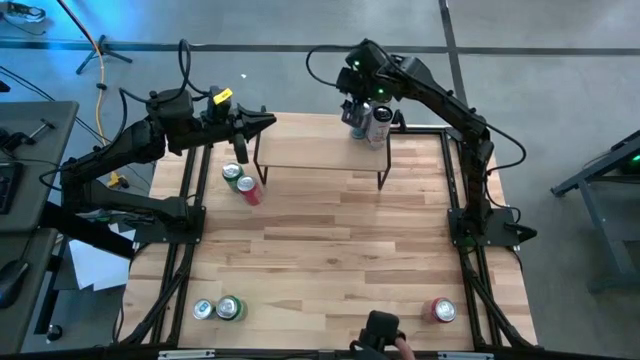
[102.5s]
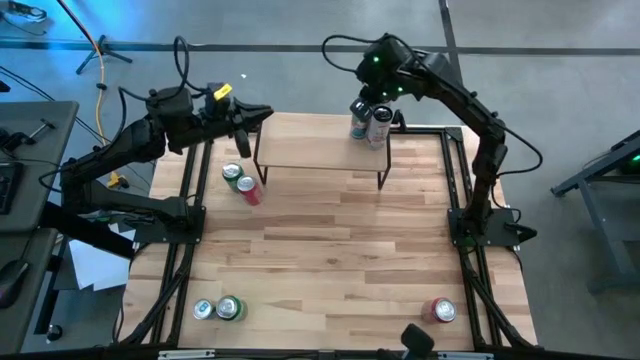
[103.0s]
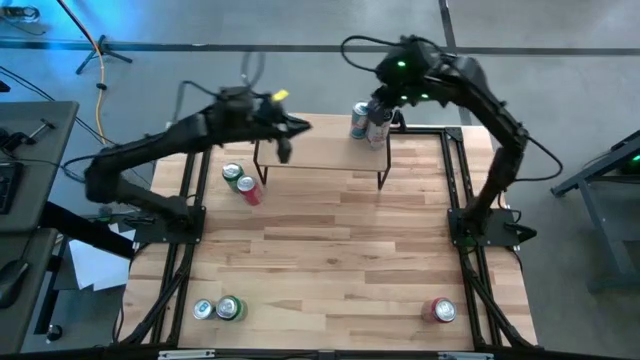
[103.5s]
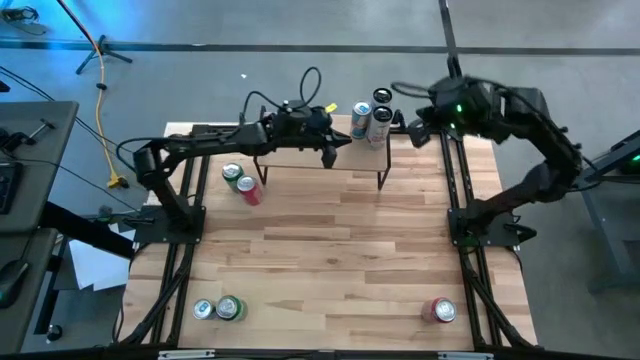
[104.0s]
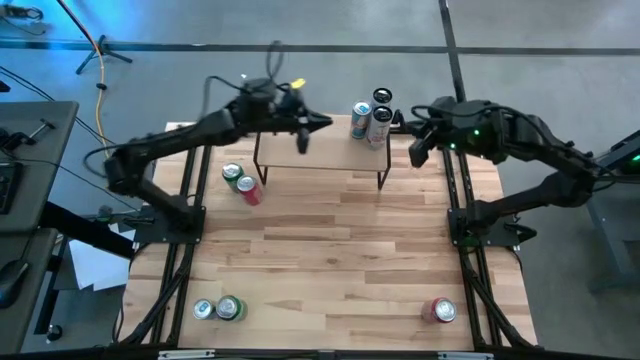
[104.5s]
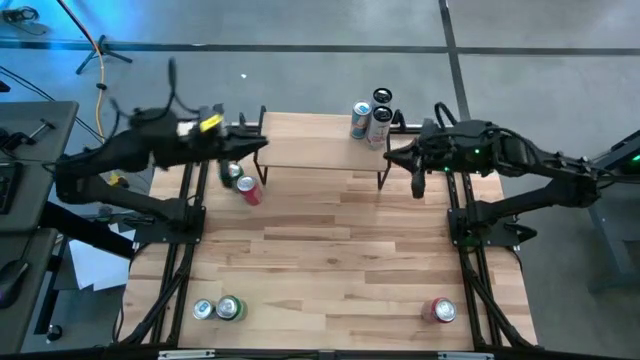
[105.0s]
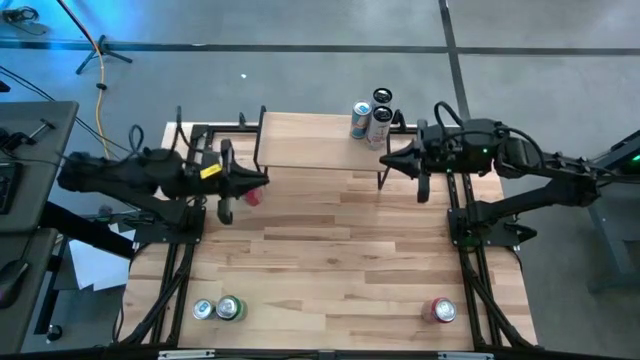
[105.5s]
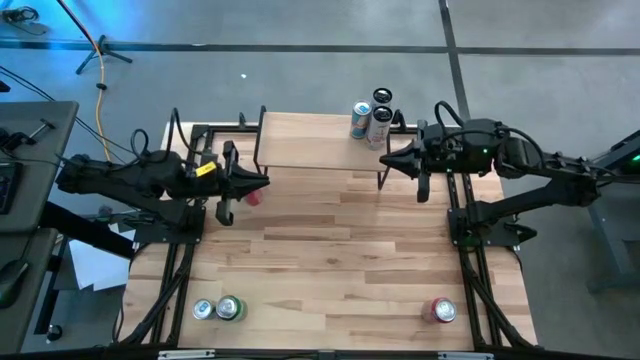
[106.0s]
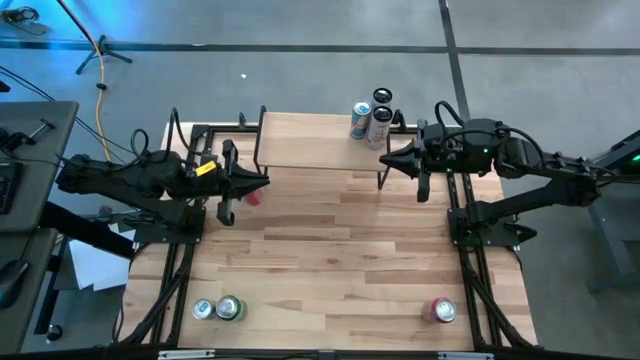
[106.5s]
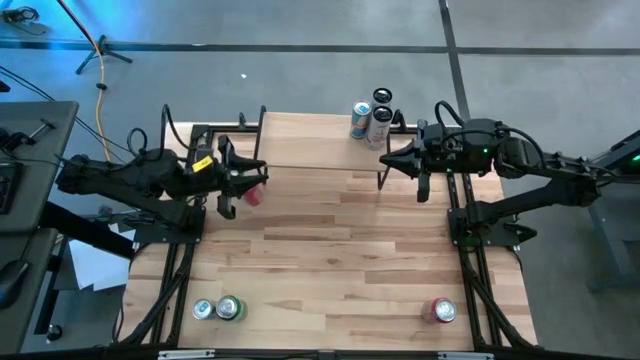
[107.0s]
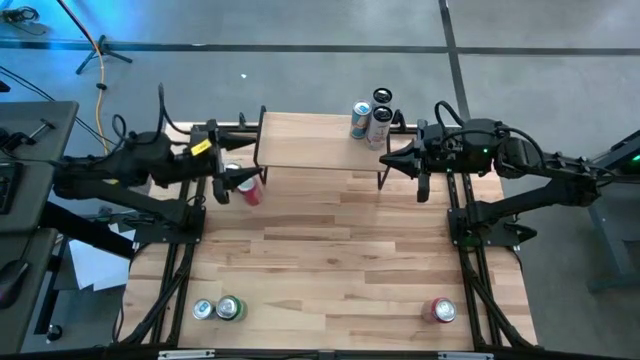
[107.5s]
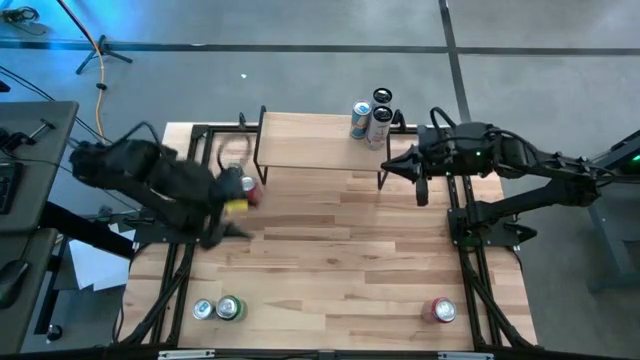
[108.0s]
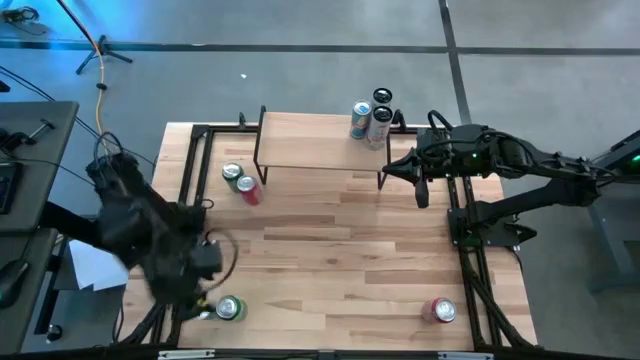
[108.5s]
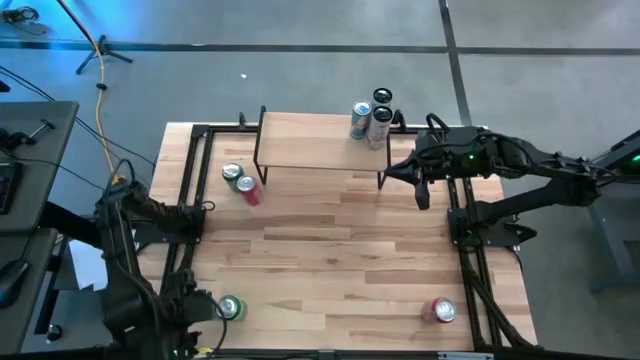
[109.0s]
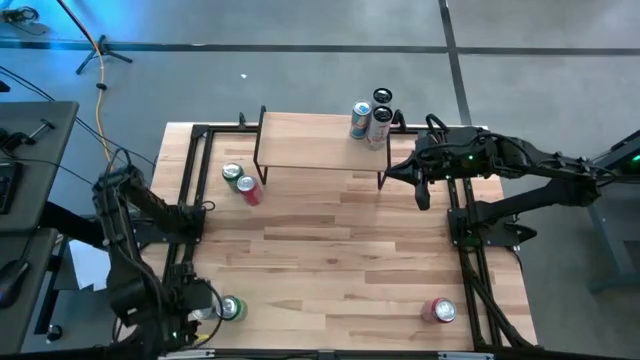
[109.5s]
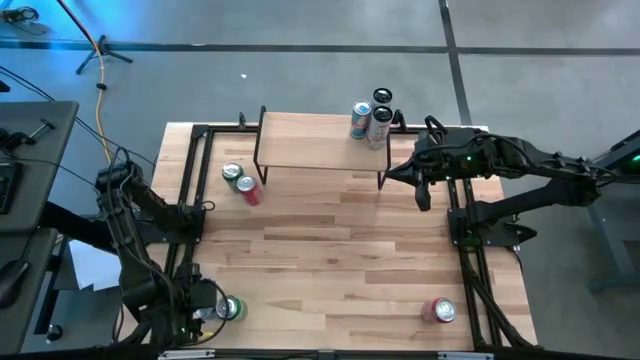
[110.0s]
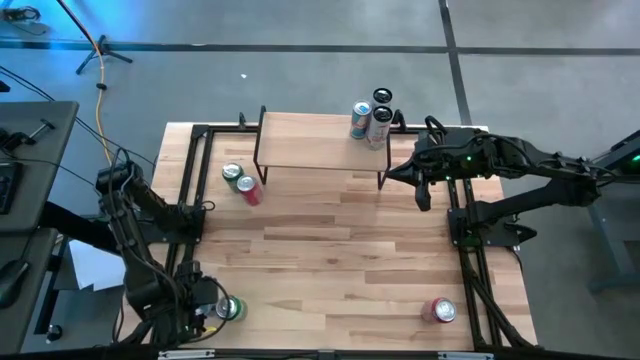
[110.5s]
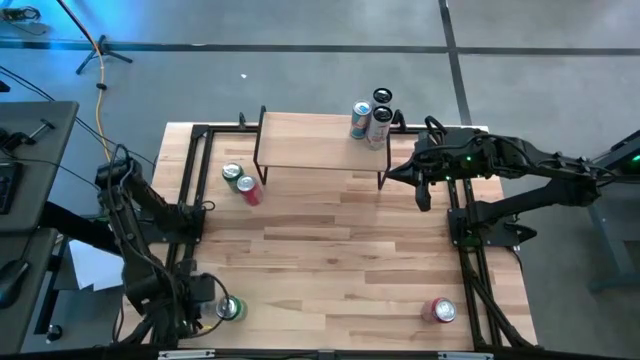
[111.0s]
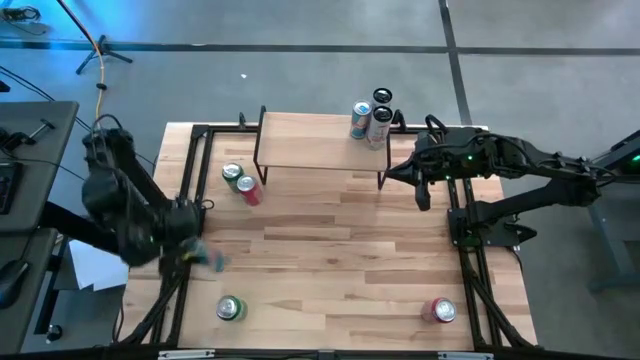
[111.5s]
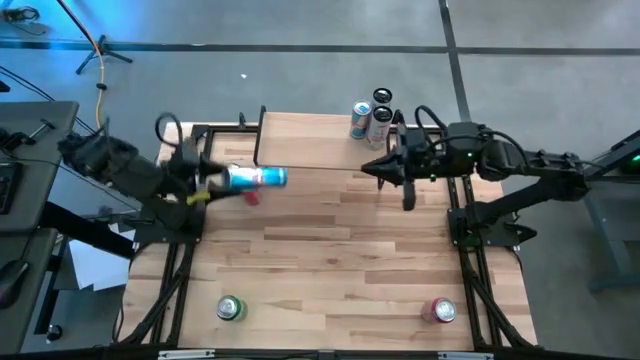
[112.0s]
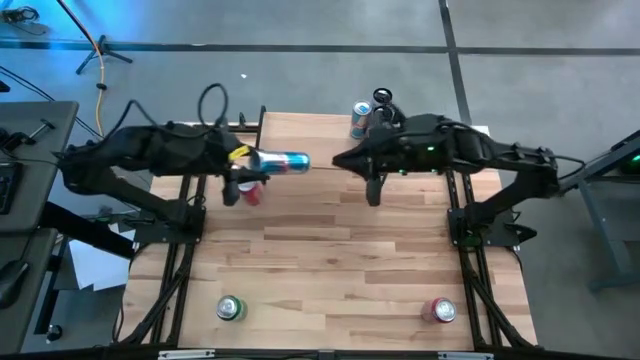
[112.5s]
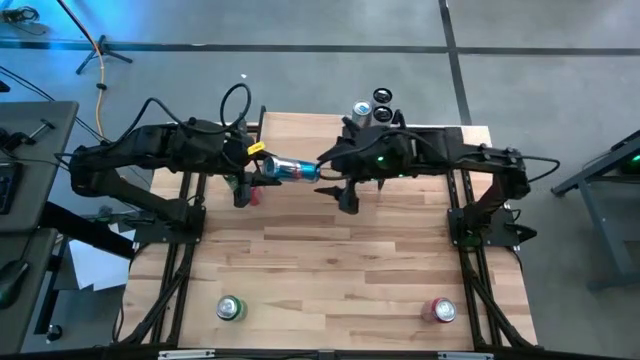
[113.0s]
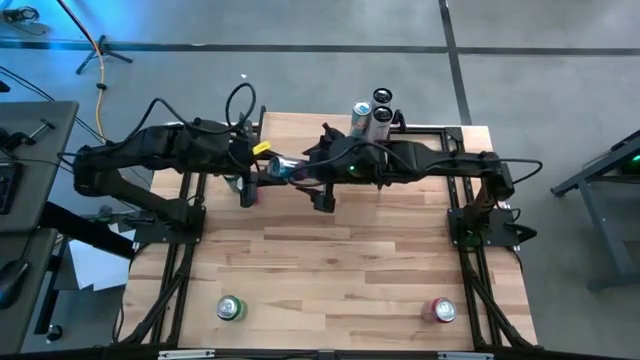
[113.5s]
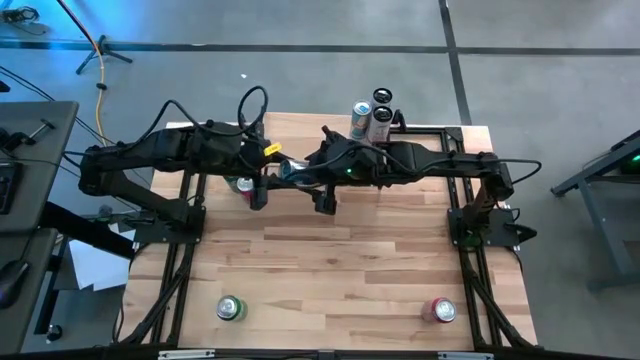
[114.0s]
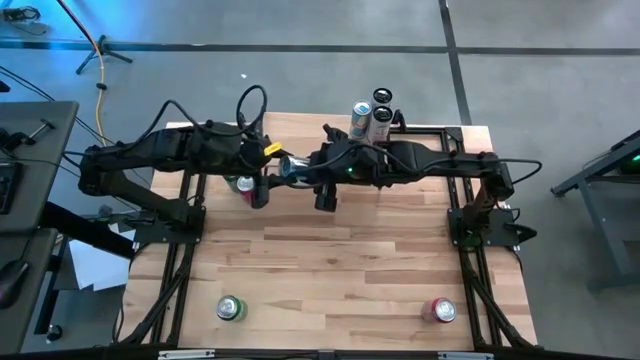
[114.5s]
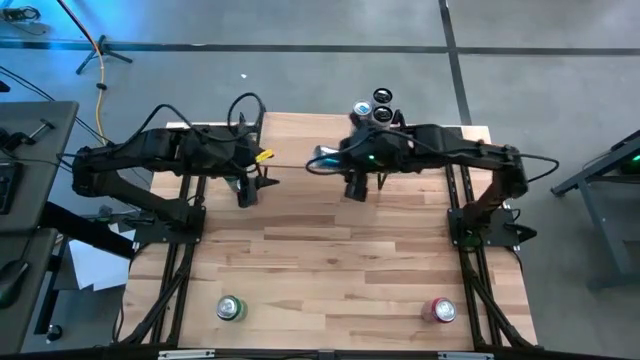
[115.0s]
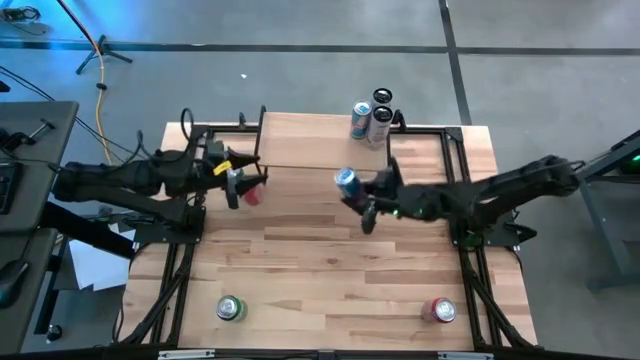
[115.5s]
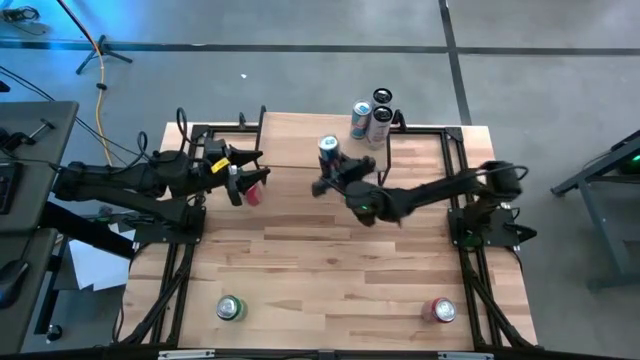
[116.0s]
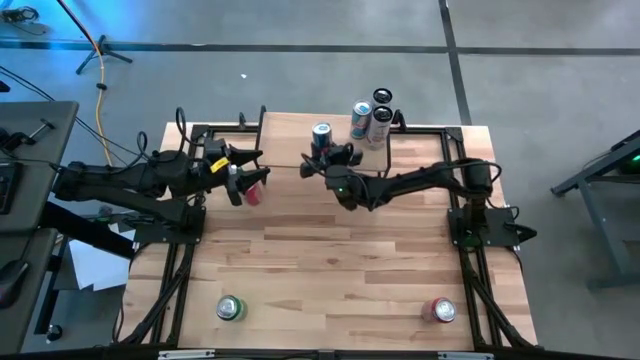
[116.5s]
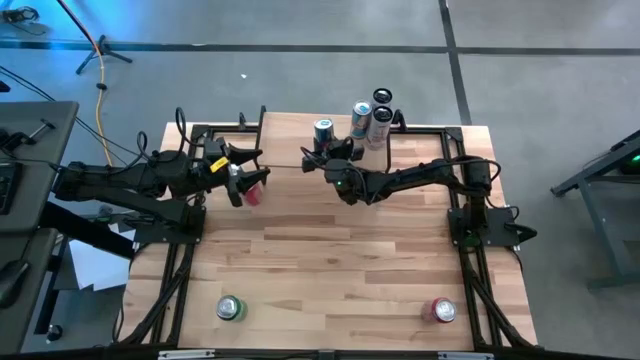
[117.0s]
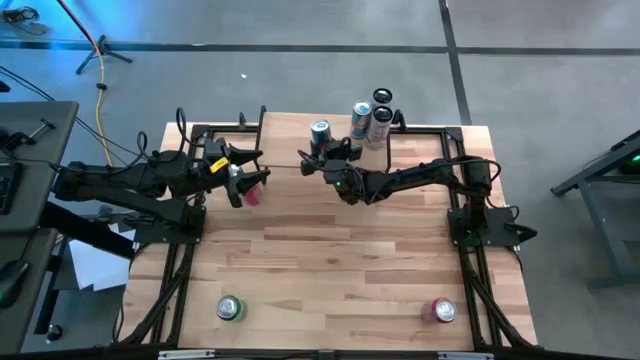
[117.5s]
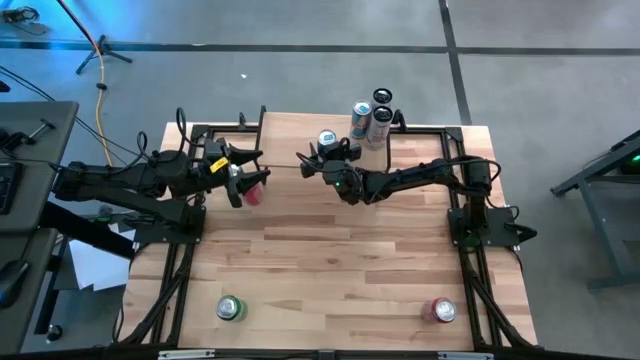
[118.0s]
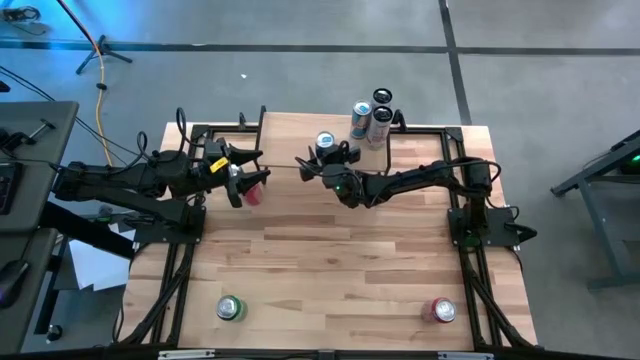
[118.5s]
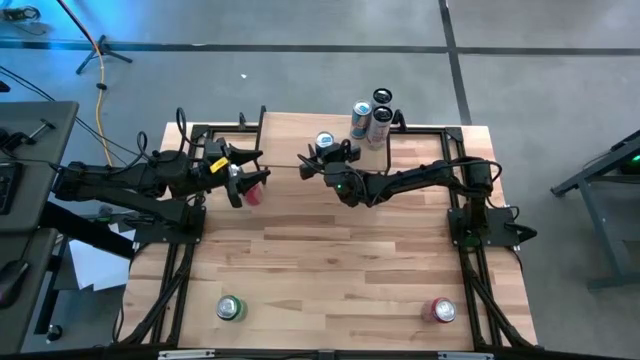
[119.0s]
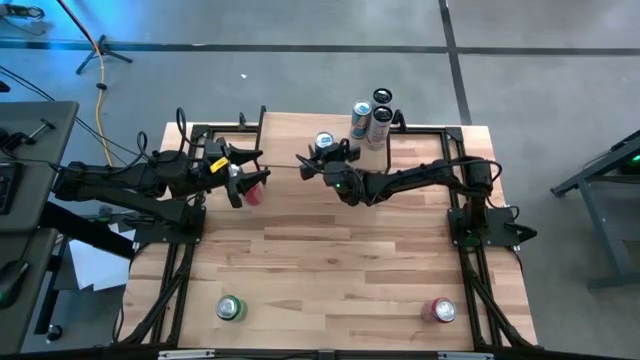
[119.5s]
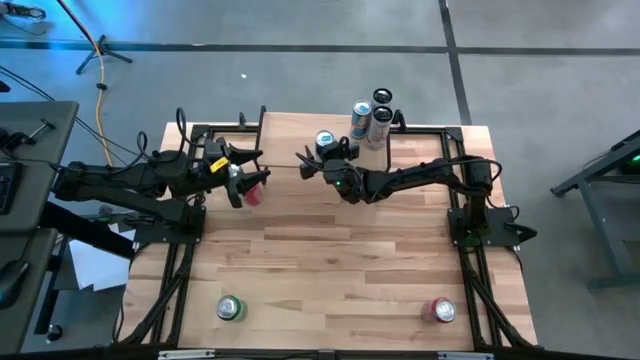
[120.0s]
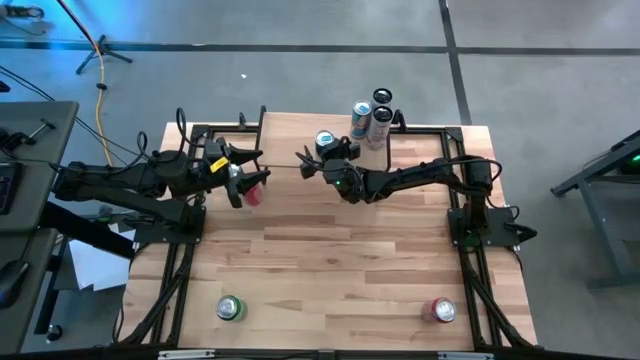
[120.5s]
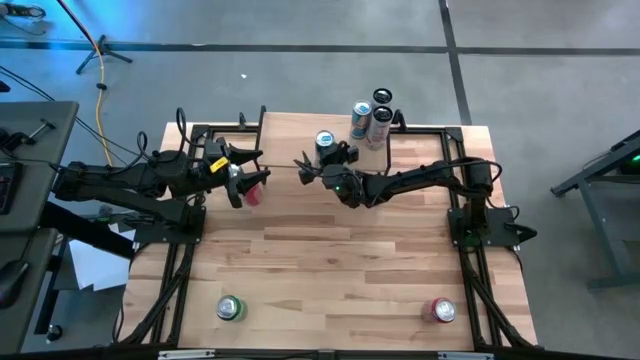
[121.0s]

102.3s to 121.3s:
Task: Place canned beverage on shelf
Put the blue soda can on the shelf aligned with the other blue soda can
